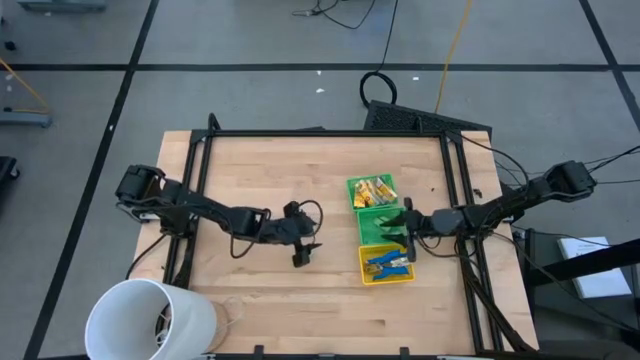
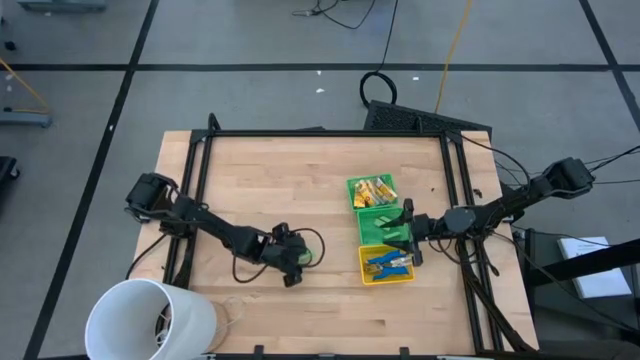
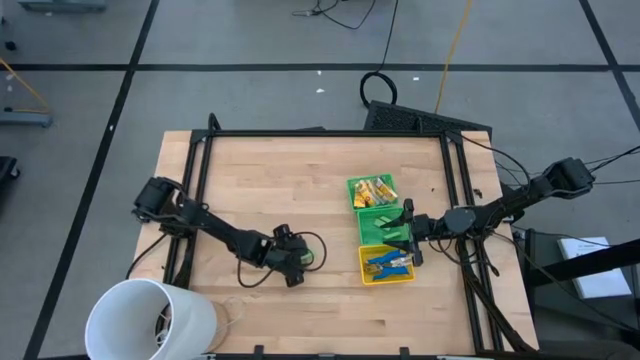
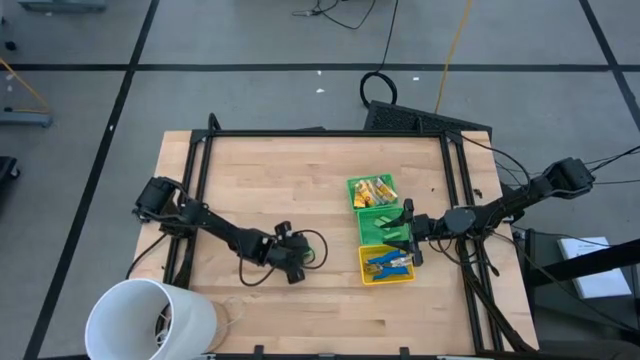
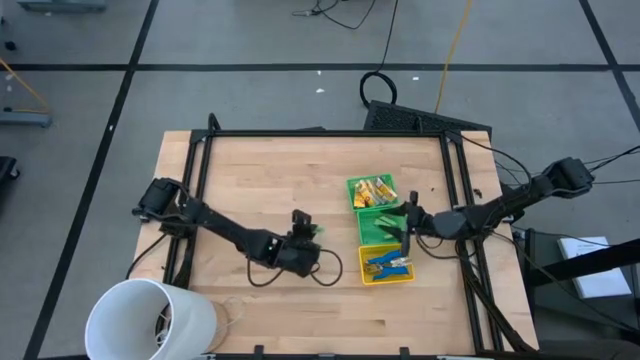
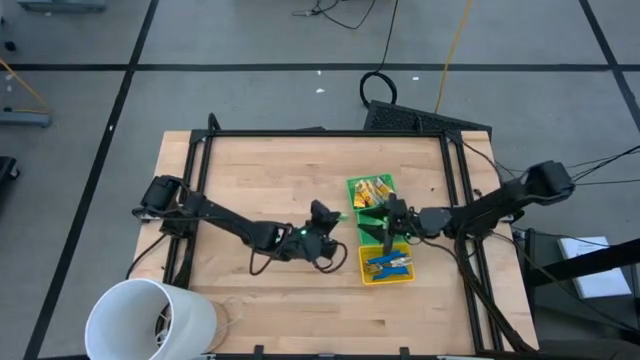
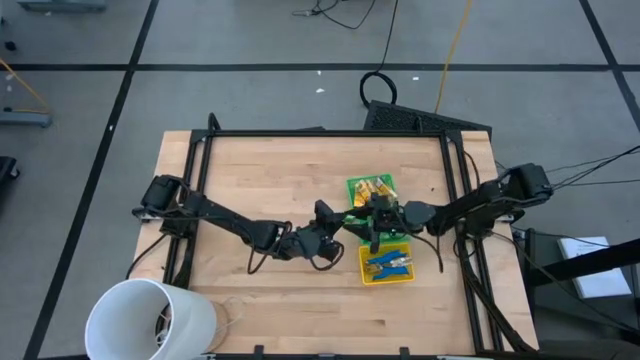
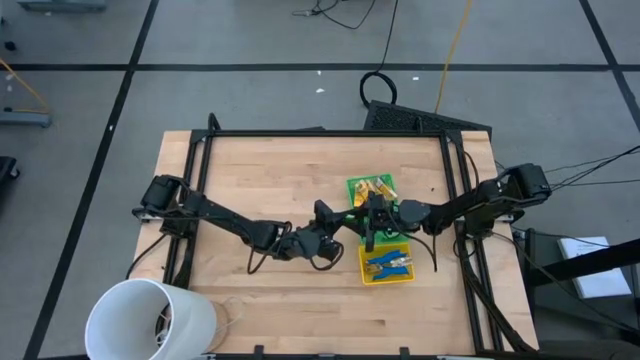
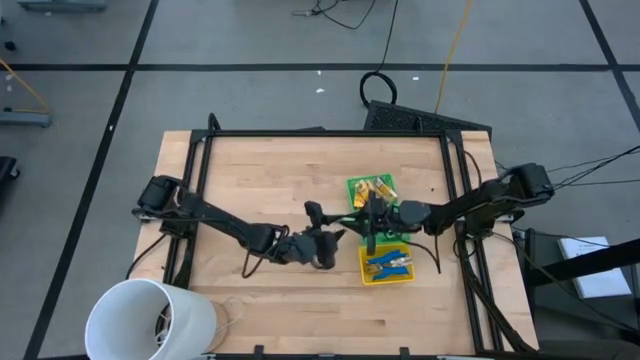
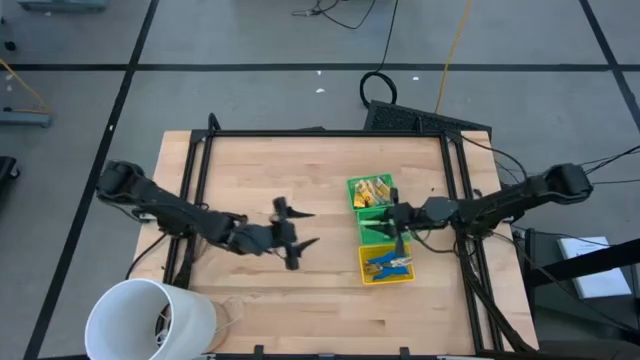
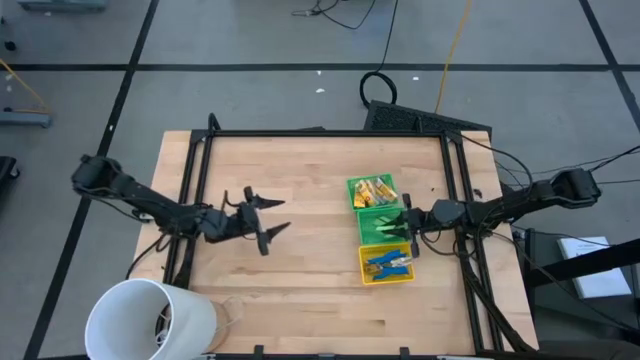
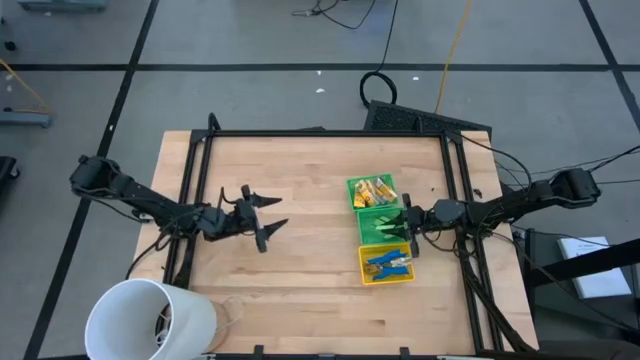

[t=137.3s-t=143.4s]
Task: Pick & Place School Supplies
Put the green eraser into the bottom green bin

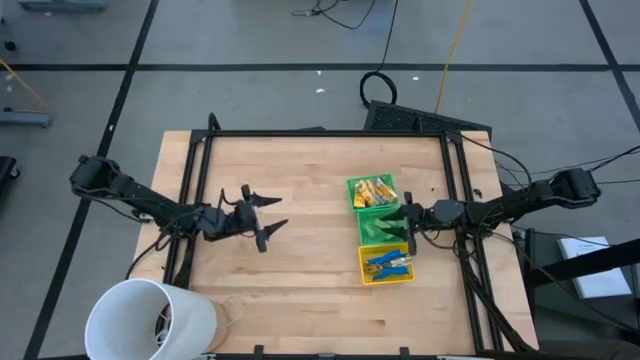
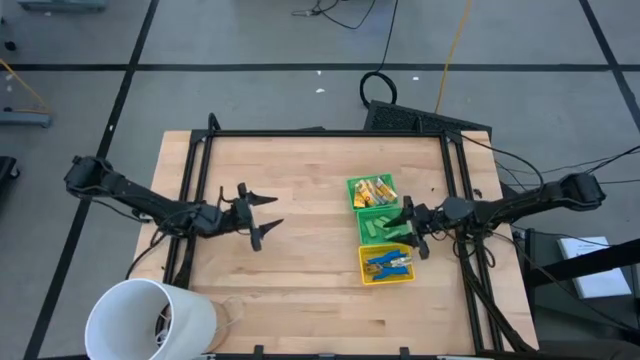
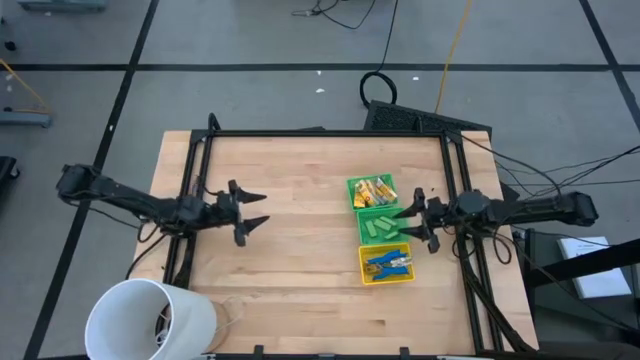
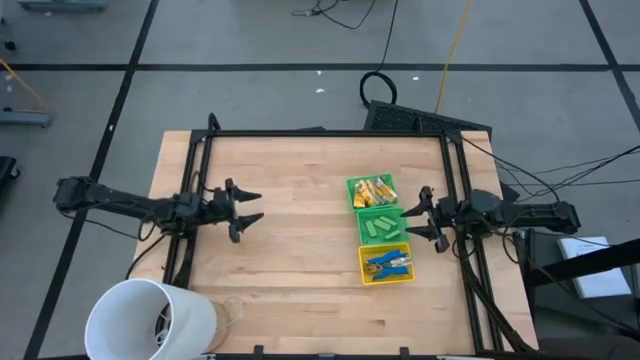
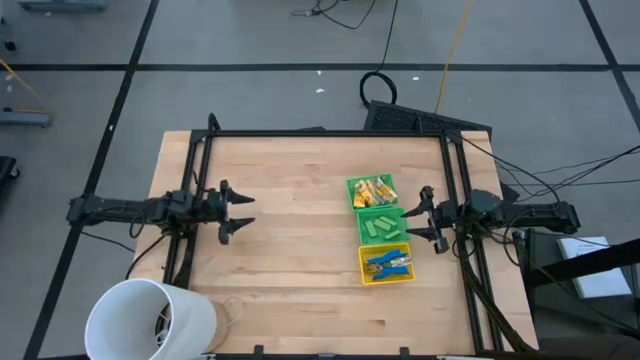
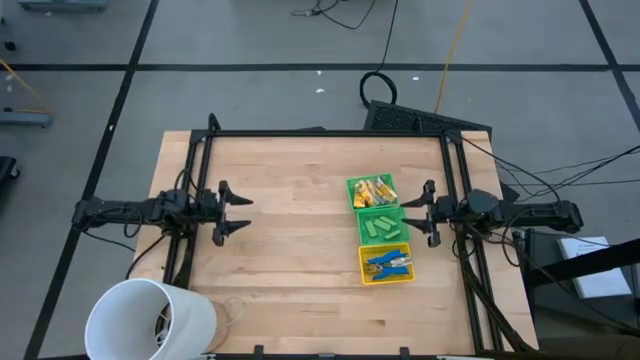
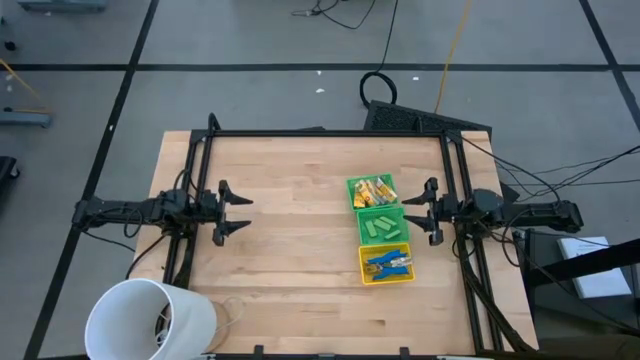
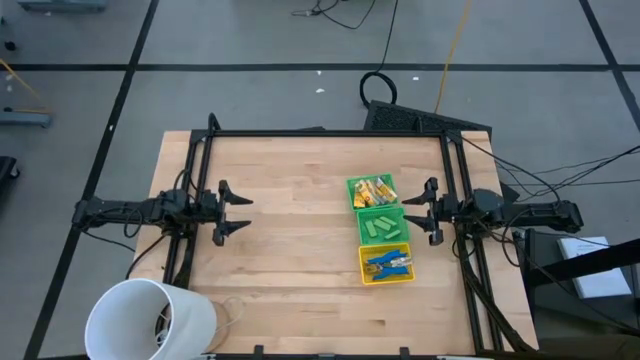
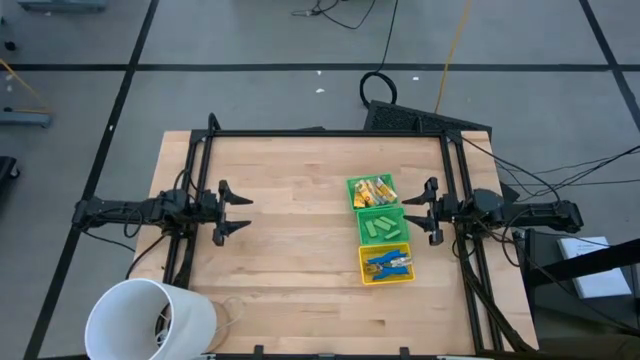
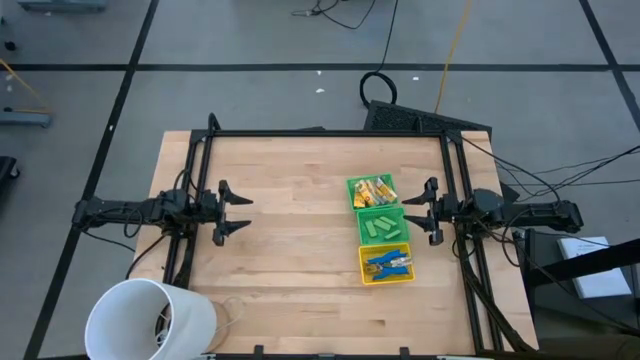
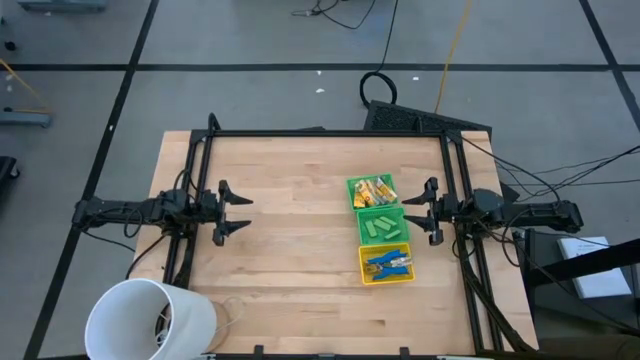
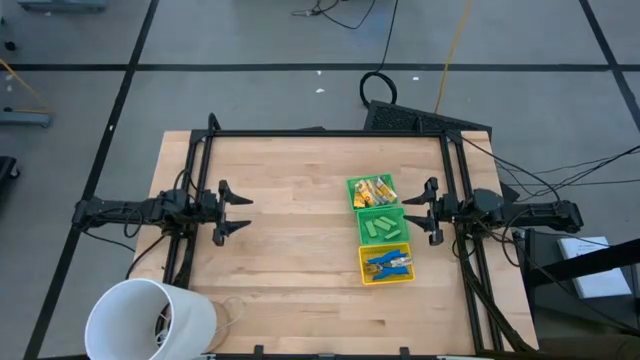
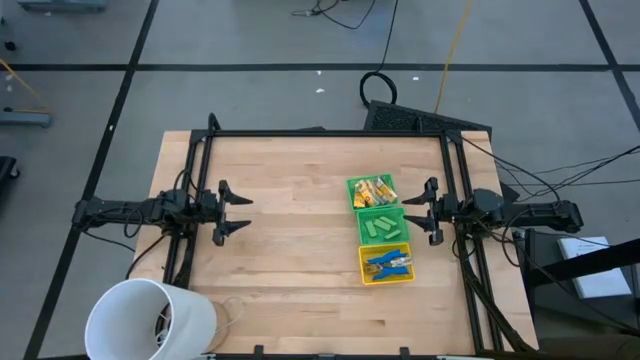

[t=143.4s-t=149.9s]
Return to Home Position

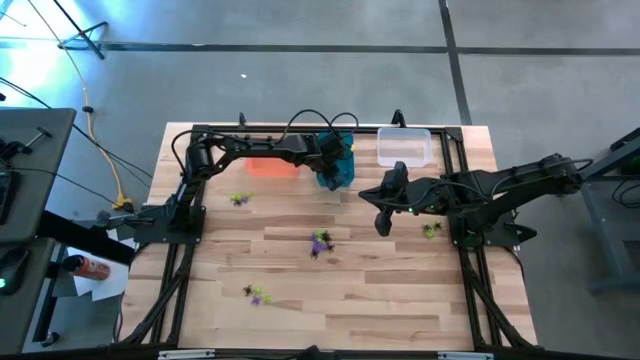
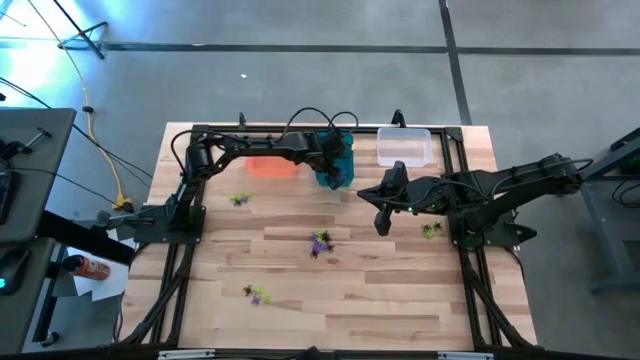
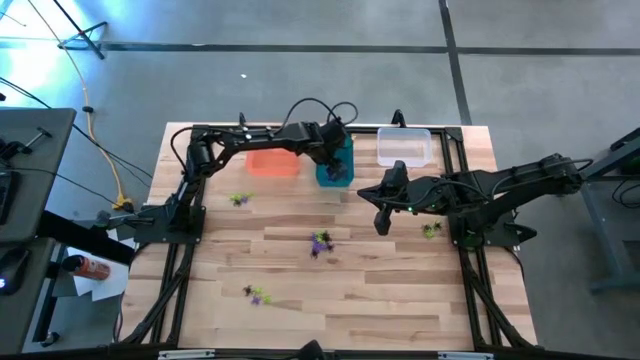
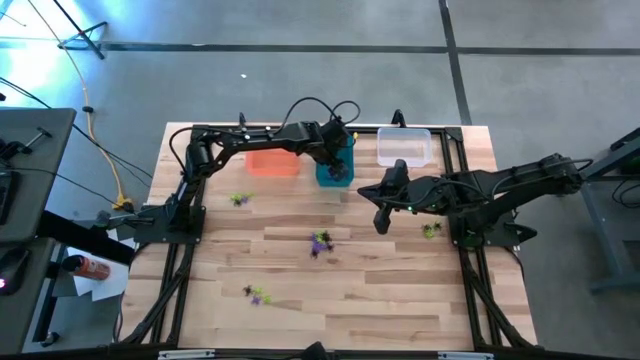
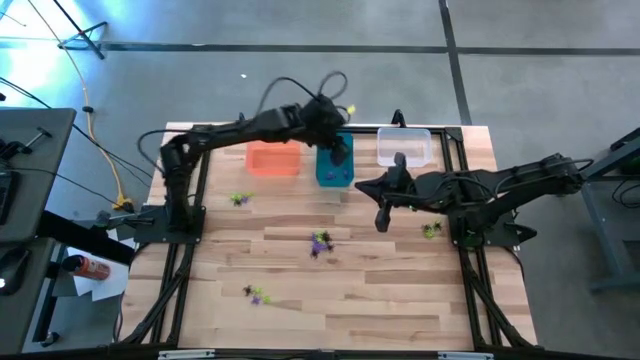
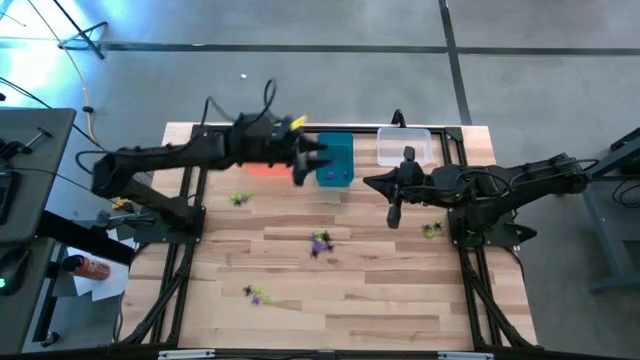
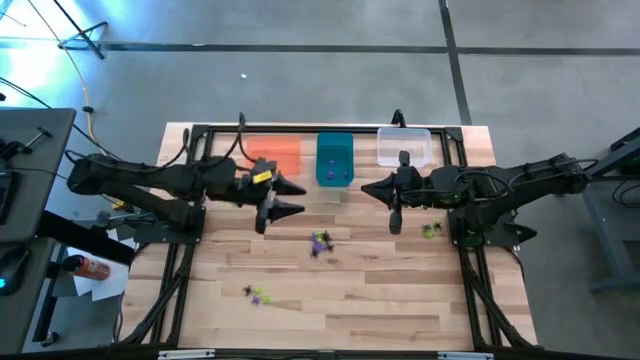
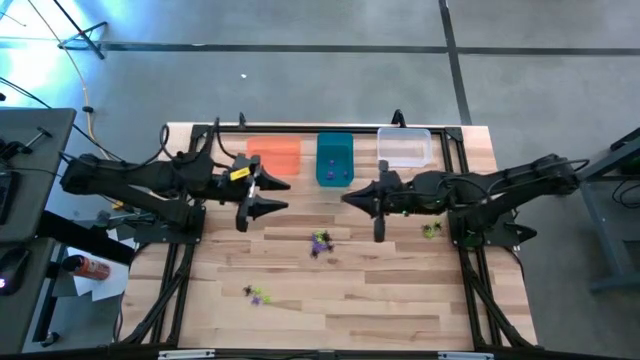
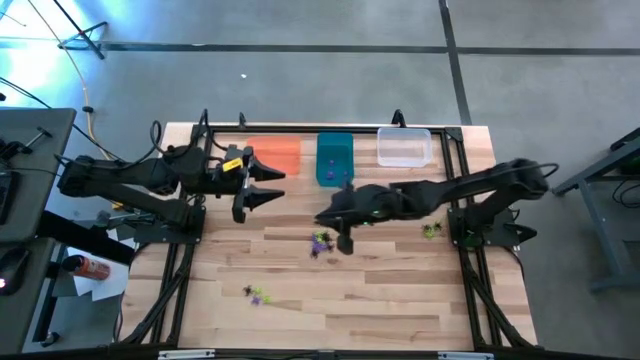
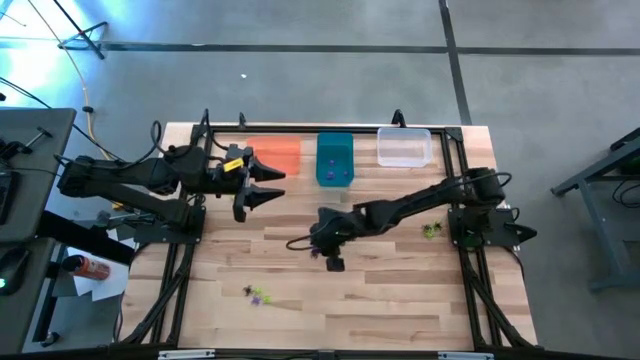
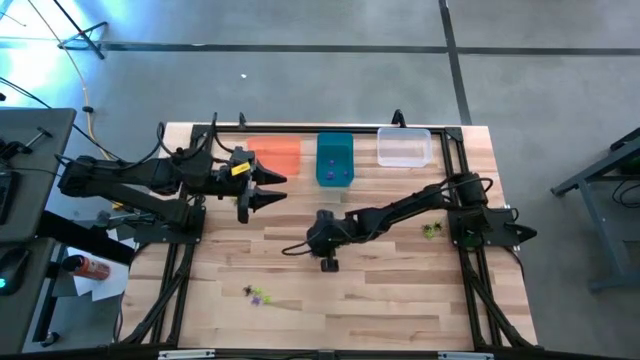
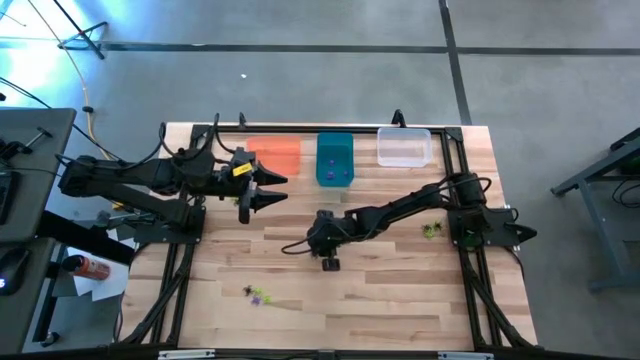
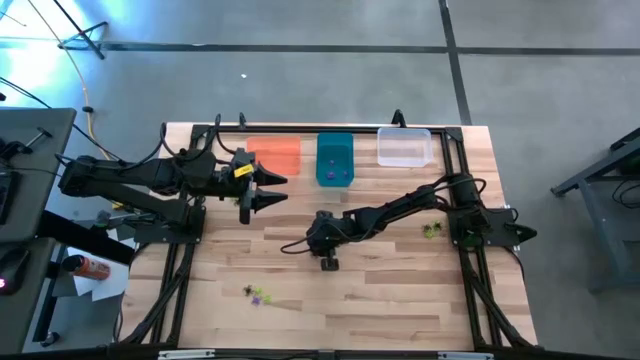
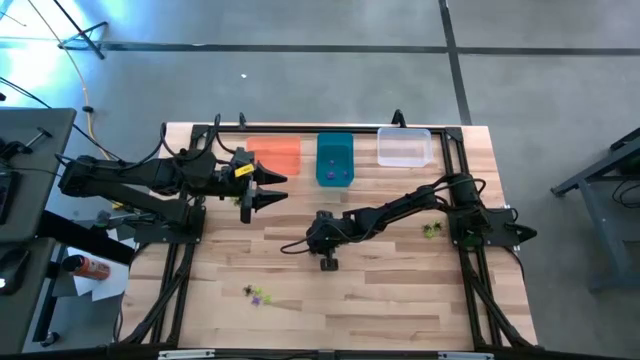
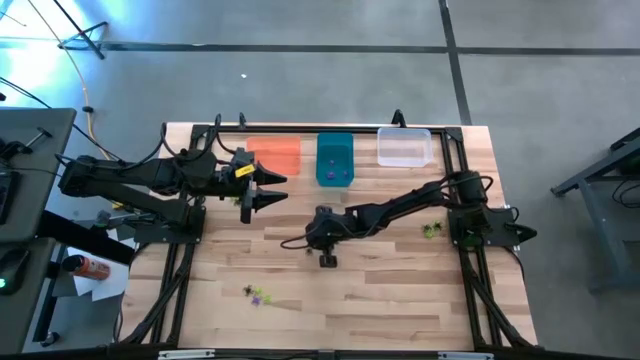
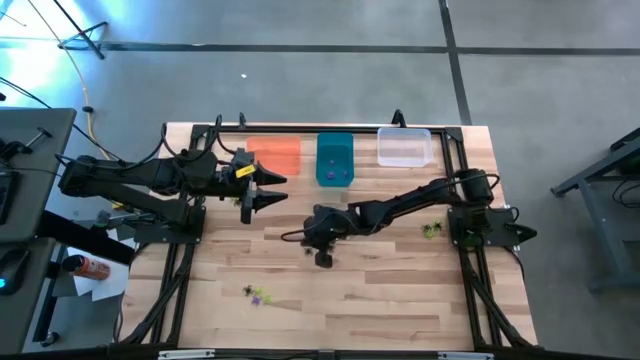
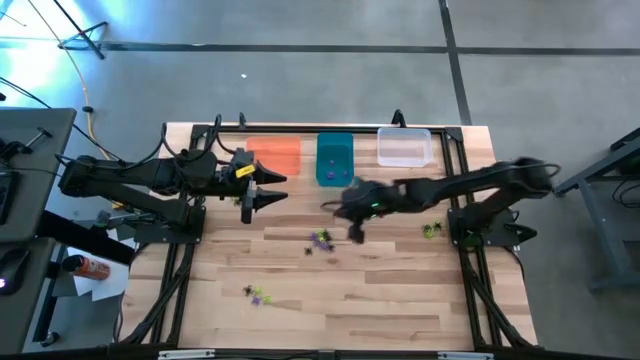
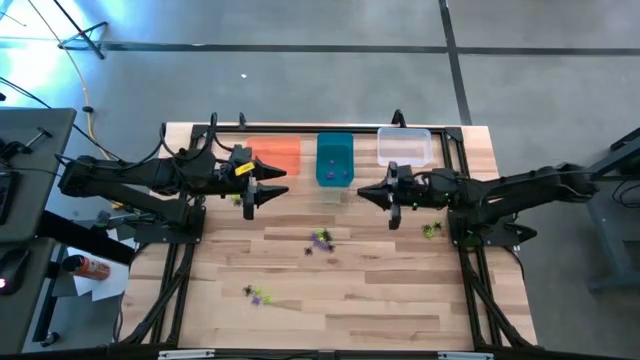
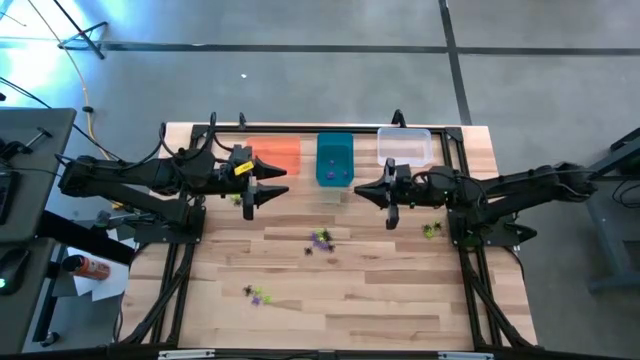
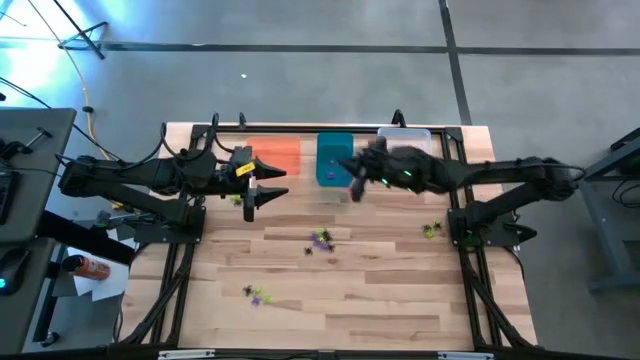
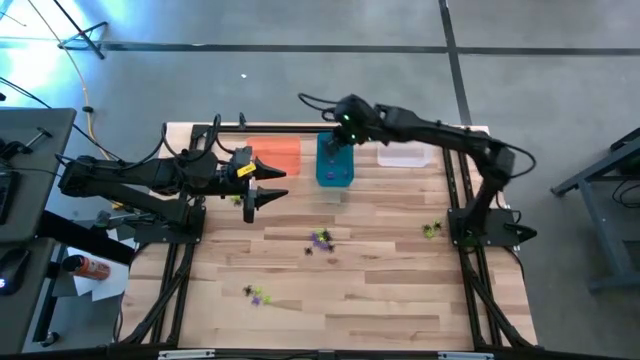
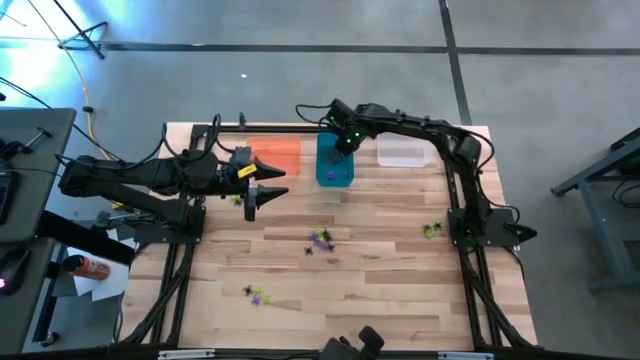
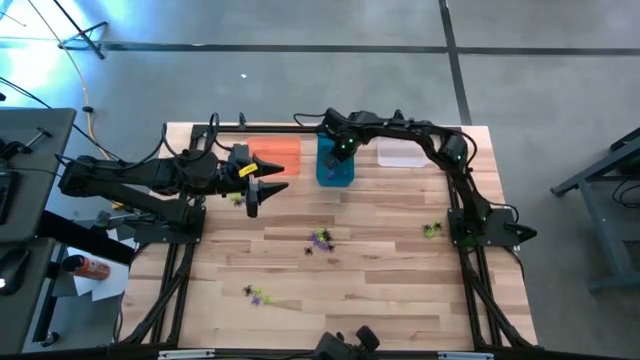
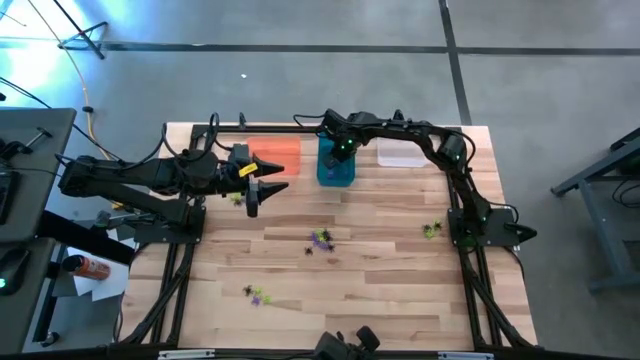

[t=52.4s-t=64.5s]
Task: Sort Halloween decoration
Put the purple spider toy into the blue bin
